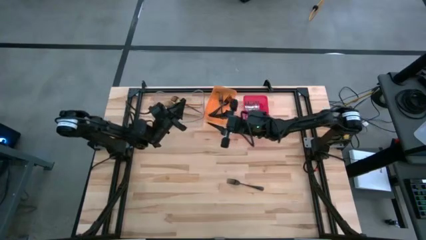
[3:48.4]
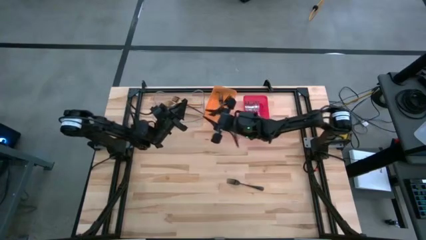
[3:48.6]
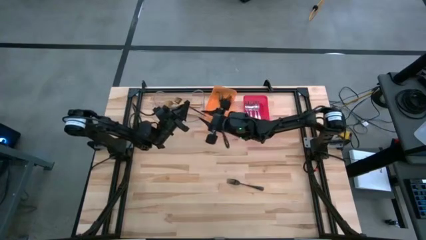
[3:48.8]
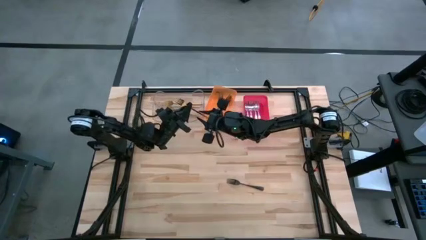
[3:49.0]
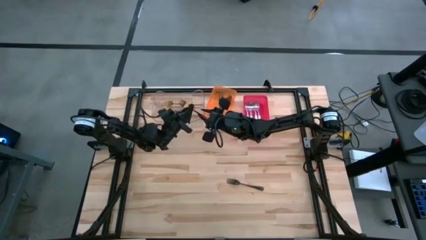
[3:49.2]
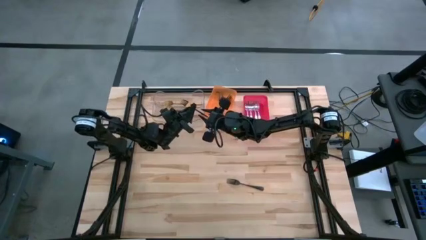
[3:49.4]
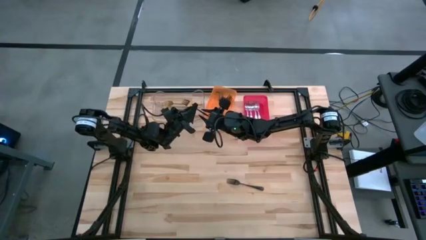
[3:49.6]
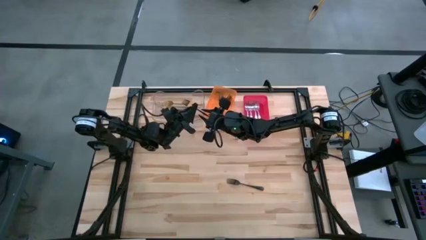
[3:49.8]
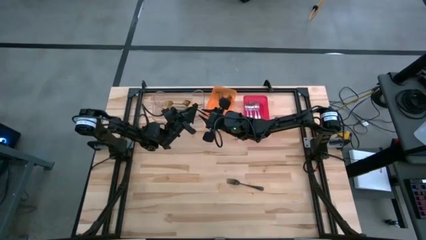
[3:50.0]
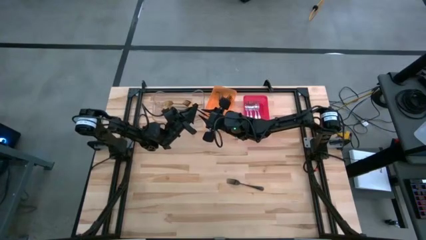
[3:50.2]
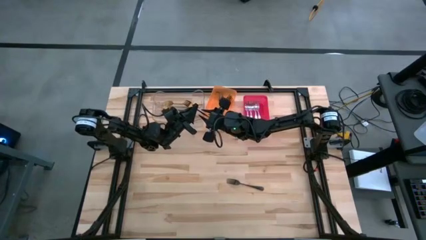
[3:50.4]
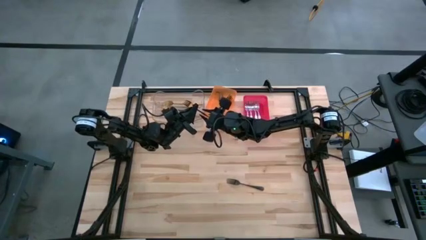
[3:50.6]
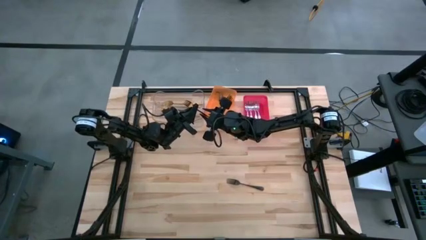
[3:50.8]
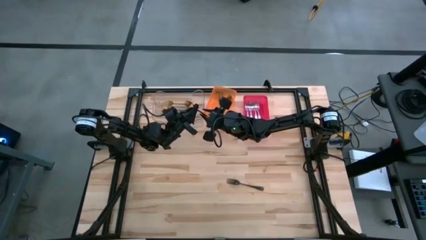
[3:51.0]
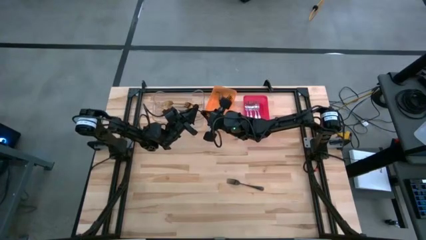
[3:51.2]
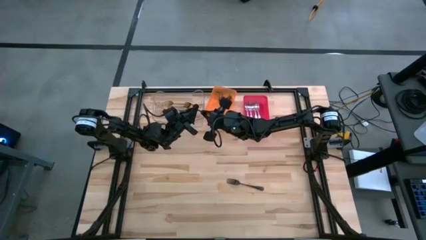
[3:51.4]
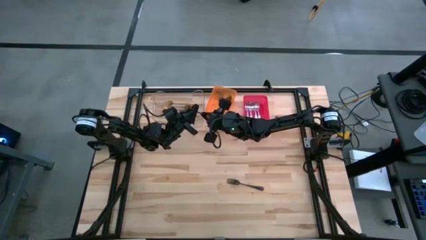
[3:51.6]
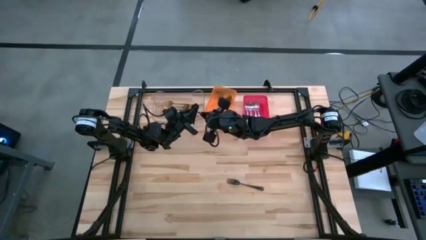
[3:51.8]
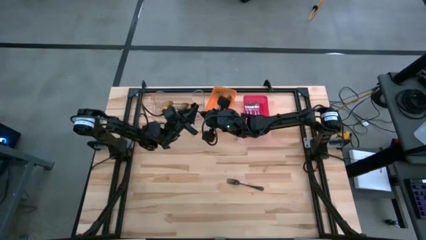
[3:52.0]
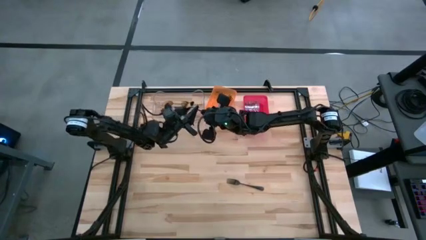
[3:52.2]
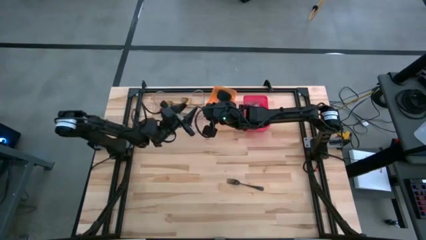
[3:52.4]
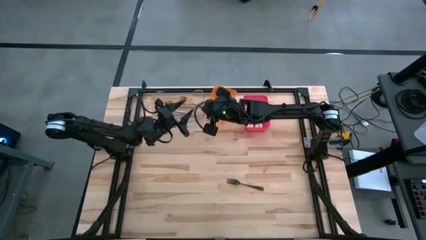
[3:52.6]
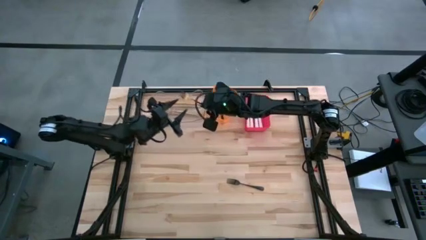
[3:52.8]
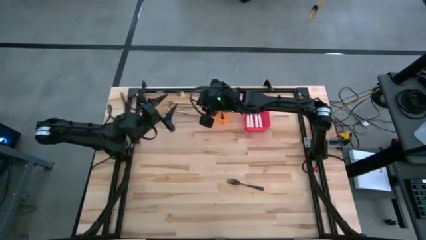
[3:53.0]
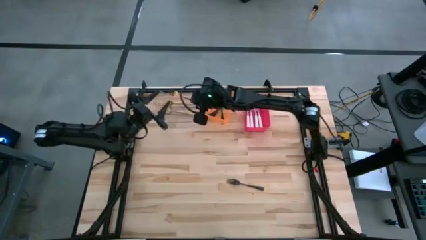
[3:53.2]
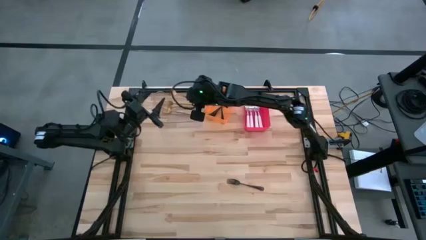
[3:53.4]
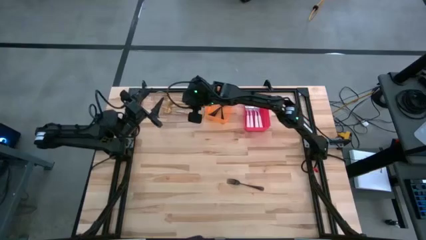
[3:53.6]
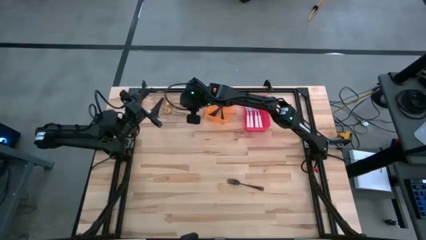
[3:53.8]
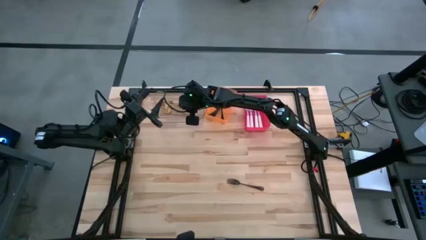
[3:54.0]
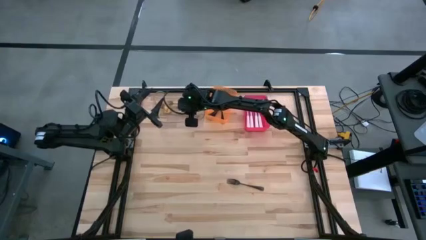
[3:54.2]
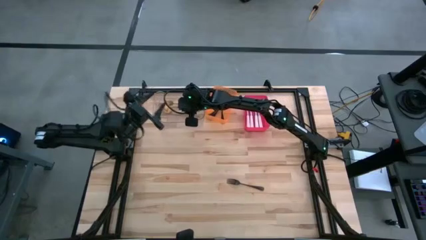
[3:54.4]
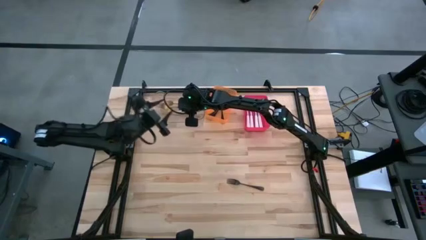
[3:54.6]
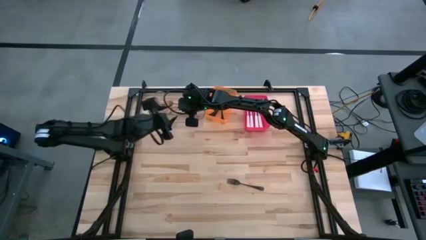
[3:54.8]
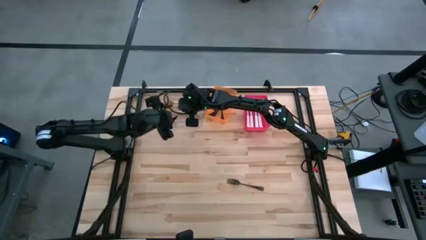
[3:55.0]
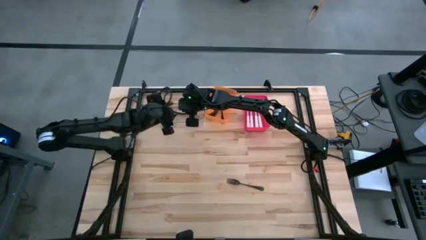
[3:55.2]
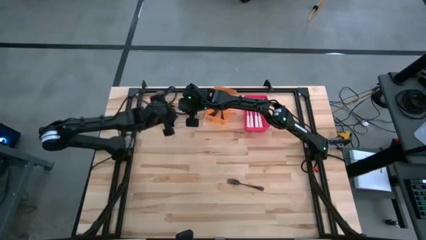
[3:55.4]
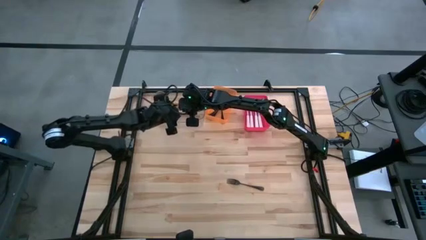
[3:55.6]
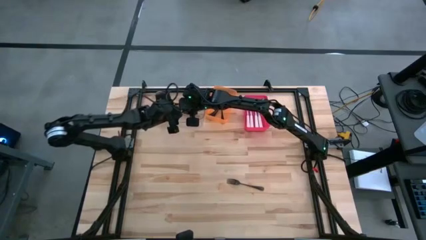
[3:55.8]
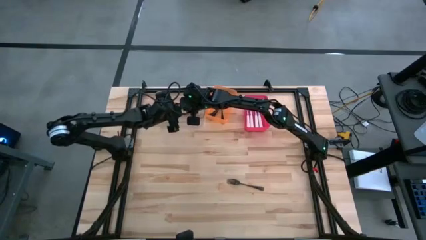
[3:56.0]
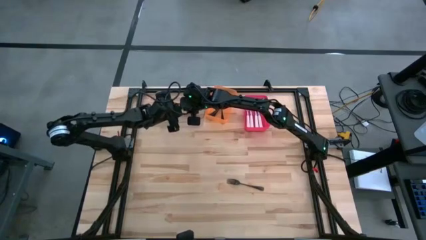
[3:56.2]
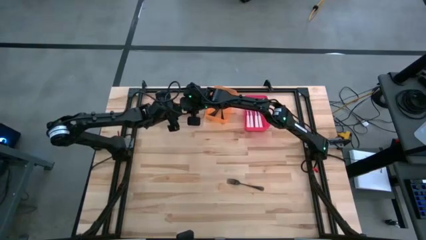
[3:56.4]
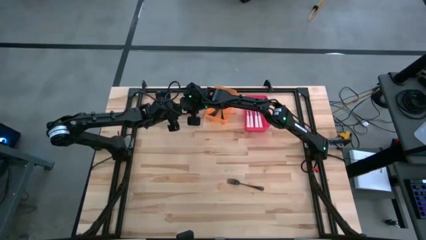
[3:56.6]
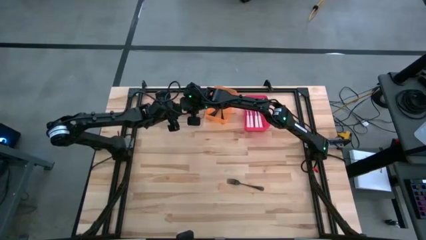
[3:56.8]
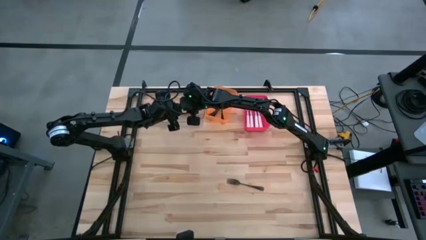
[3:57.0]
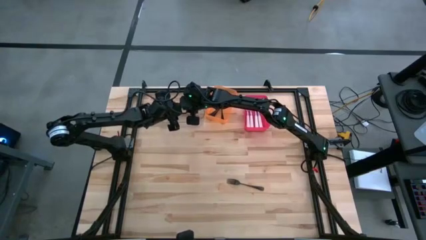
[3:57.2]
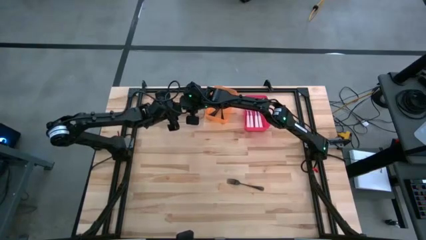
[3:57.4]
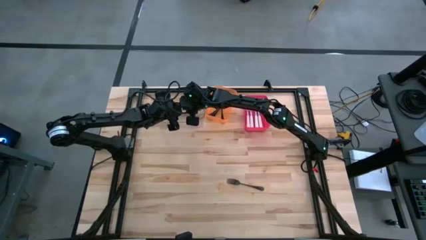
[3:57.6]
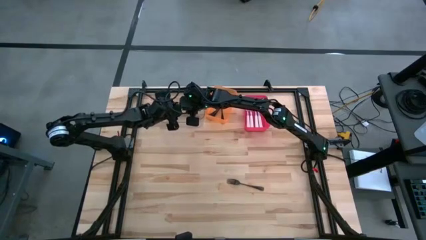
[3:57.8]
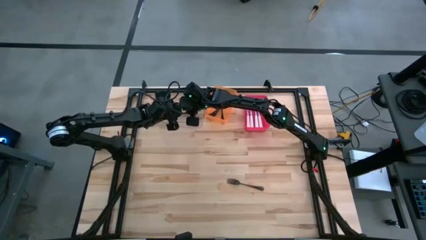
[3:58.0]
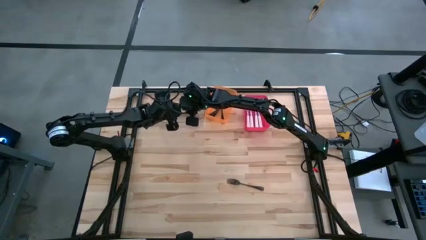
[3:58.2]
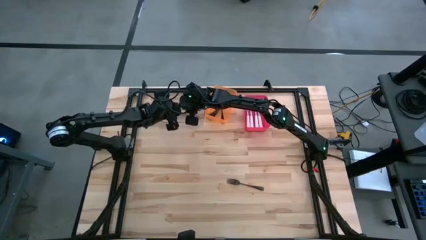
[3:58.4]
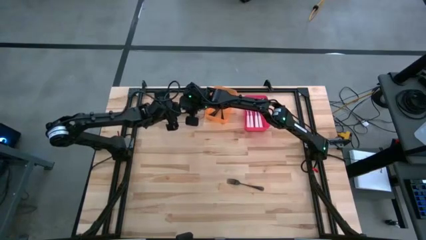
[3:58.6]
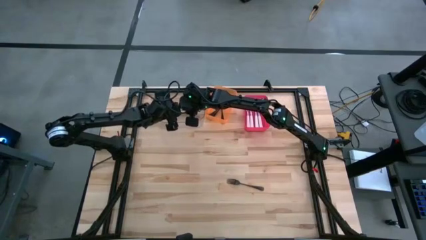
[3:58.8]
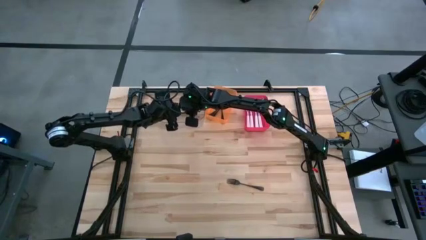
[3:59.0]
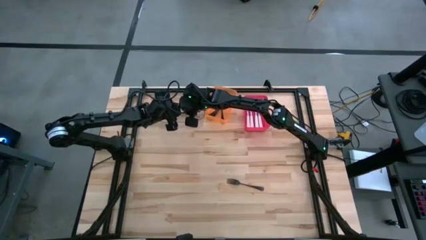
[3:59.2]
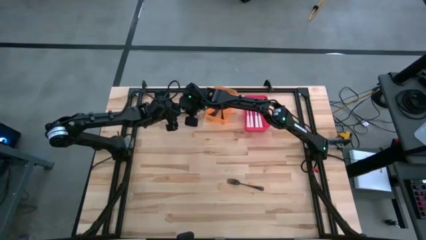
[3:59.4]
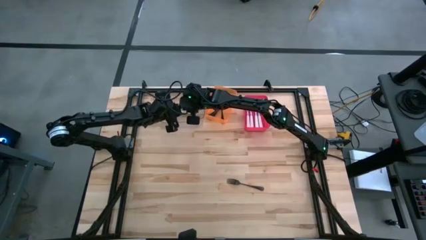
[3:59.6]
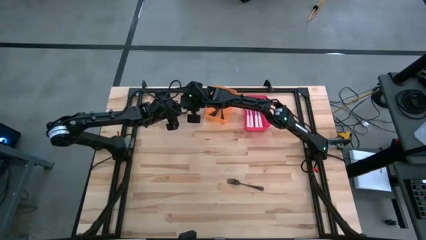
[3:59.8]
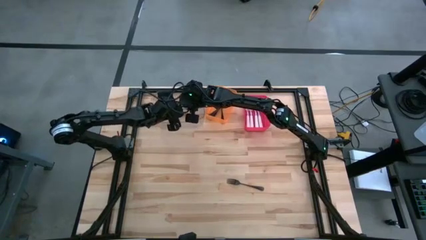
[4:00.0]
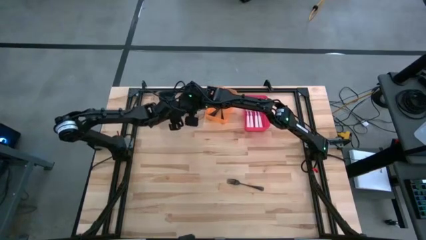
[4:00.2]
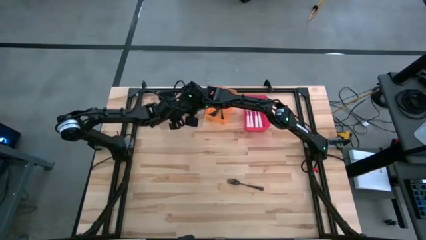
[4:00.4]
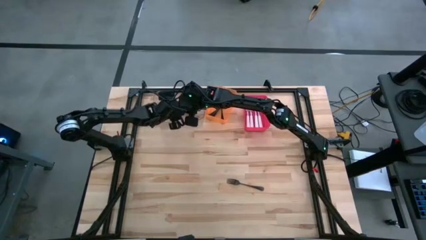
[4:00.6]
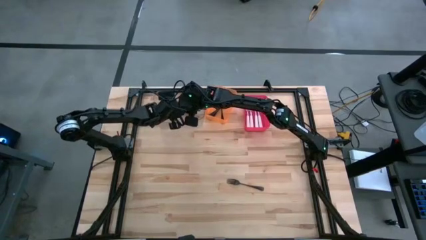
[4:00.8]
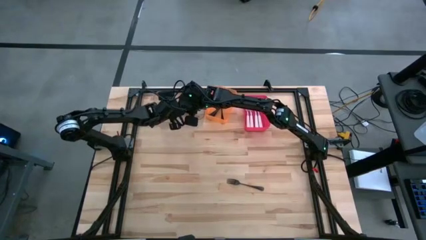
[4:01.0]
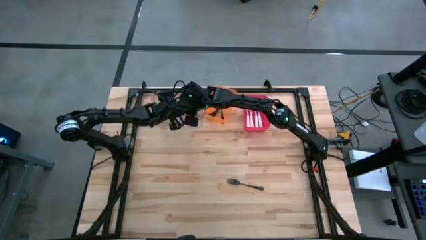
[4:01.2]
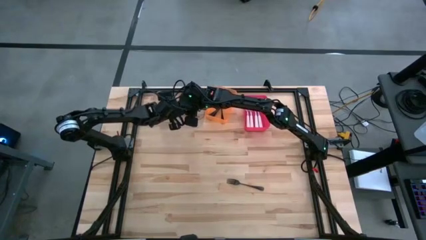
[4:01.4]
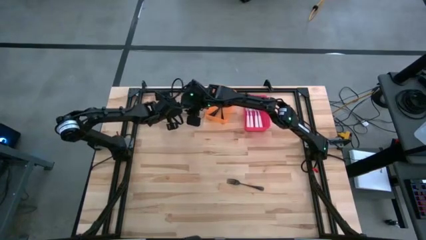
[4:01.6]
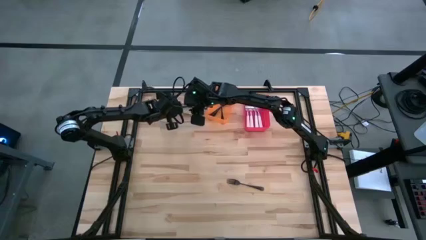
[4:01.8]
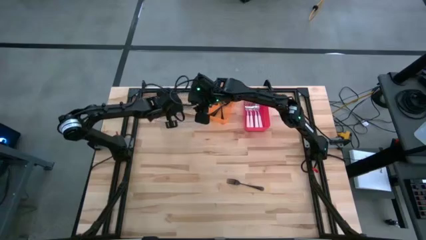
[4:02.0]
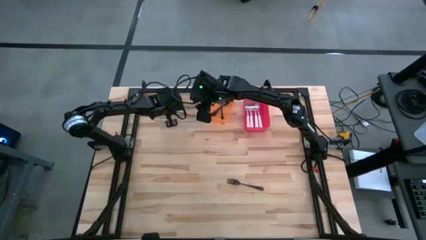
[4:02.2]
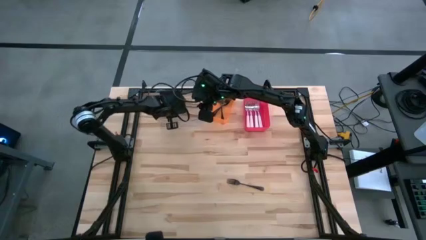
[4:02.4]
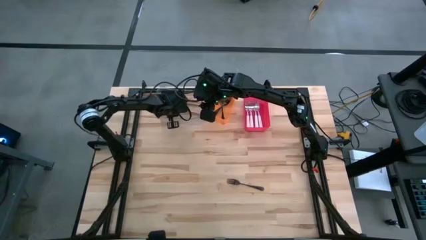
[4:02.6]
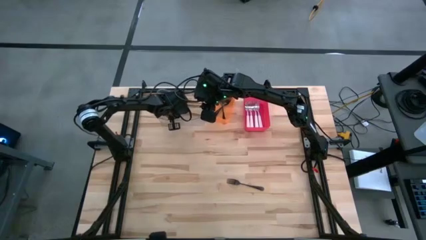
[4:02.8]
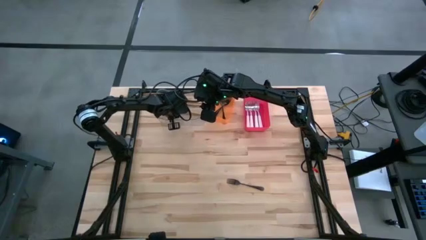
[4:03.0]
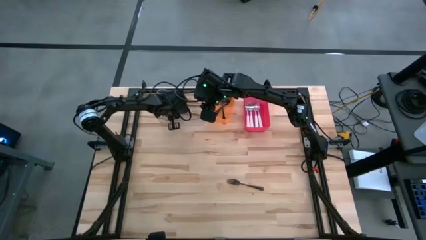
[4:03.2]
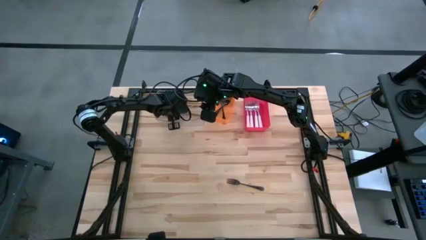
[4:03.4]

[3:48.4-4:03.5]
Task: Sort silverware by color (type)
Put the gold fork into the transparent bin
